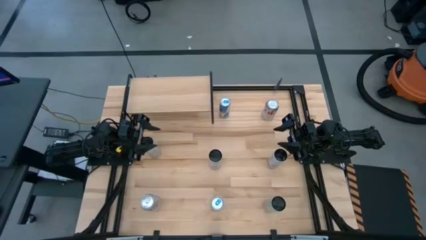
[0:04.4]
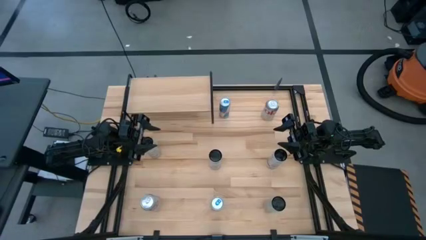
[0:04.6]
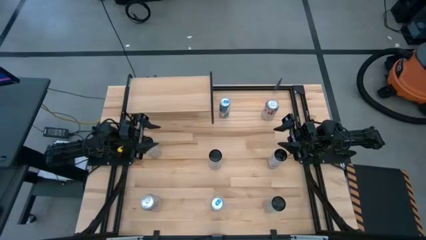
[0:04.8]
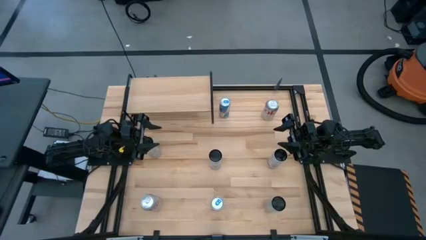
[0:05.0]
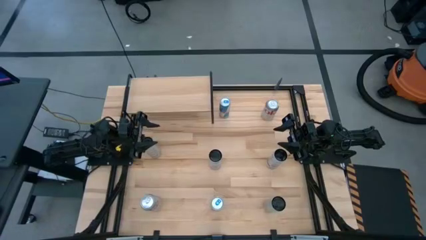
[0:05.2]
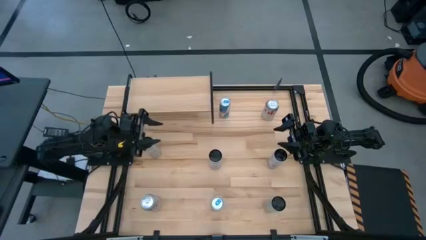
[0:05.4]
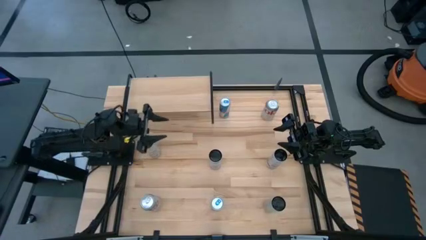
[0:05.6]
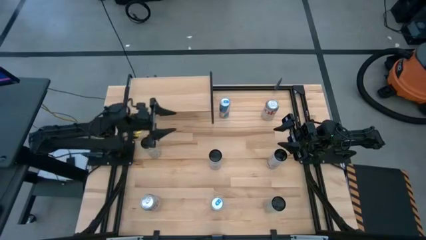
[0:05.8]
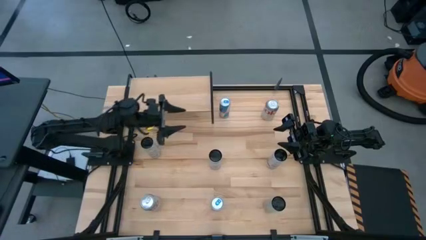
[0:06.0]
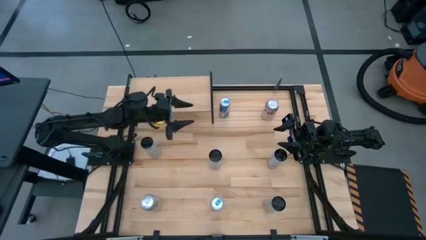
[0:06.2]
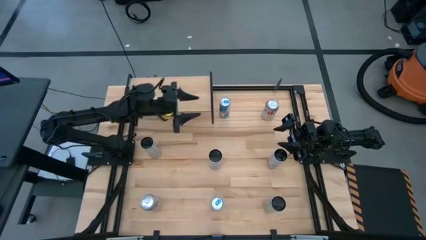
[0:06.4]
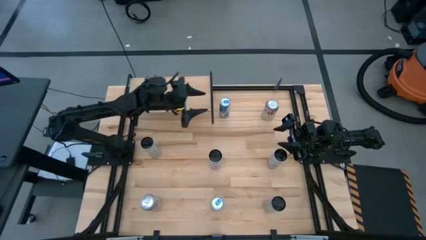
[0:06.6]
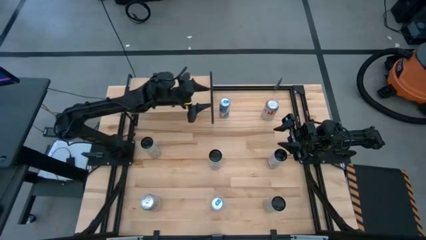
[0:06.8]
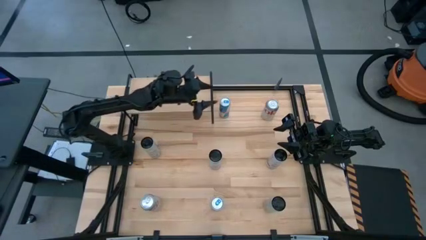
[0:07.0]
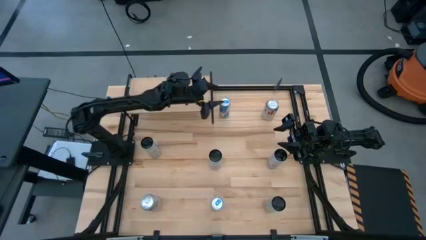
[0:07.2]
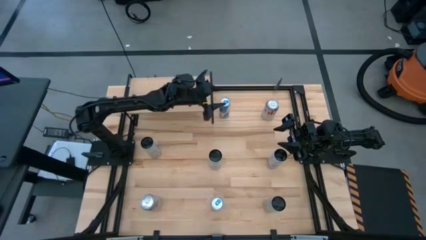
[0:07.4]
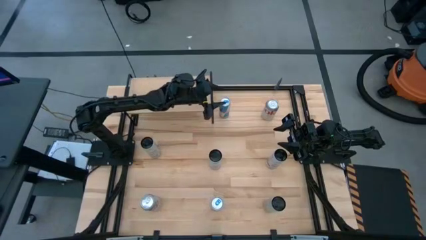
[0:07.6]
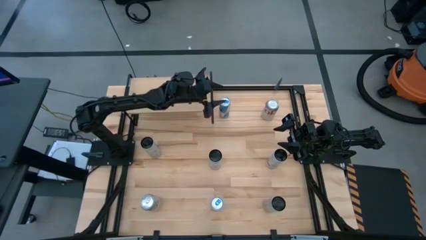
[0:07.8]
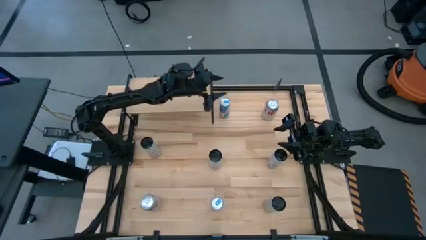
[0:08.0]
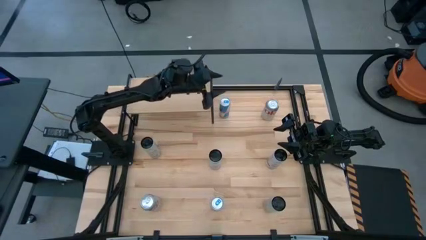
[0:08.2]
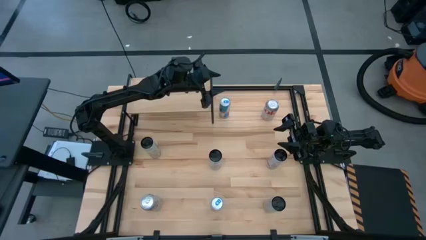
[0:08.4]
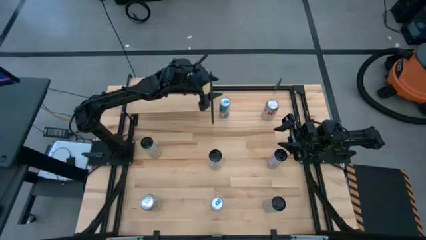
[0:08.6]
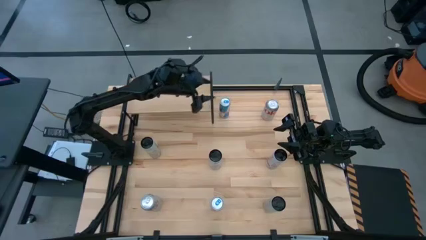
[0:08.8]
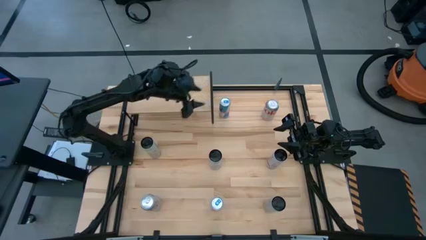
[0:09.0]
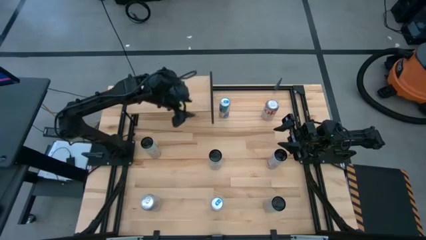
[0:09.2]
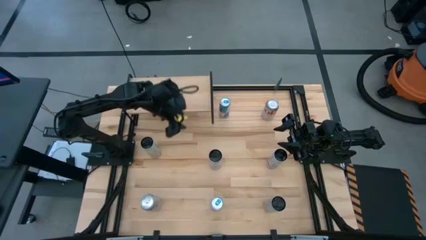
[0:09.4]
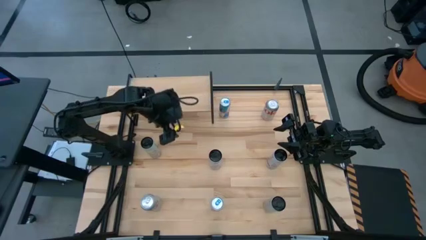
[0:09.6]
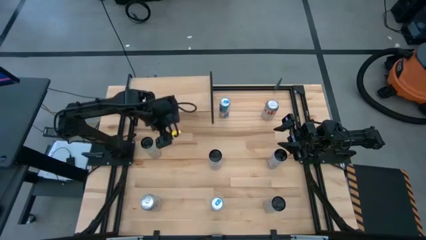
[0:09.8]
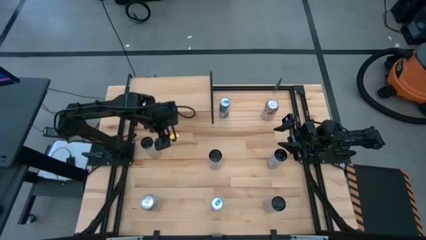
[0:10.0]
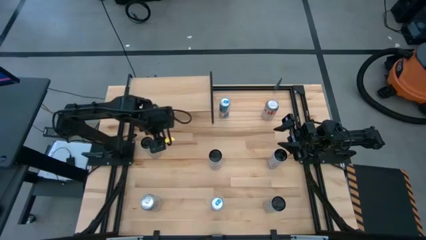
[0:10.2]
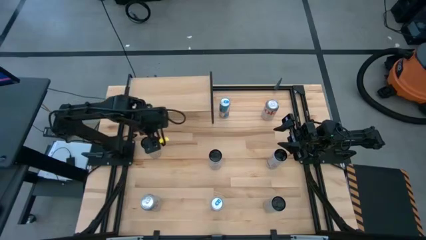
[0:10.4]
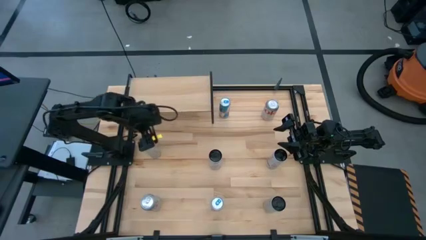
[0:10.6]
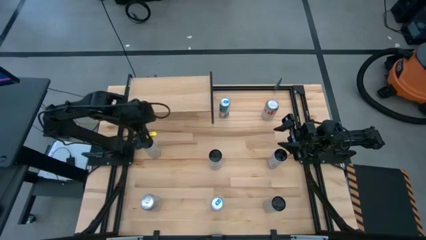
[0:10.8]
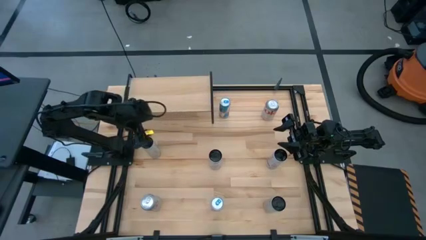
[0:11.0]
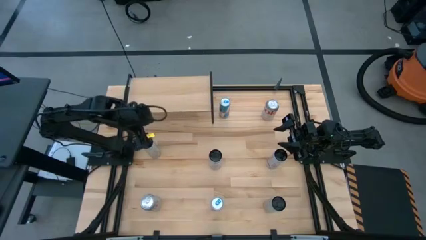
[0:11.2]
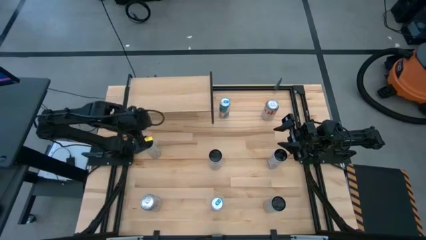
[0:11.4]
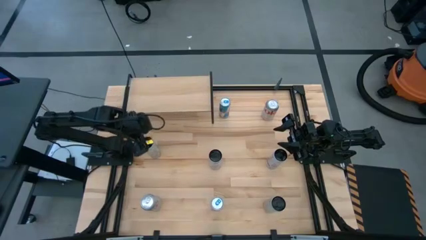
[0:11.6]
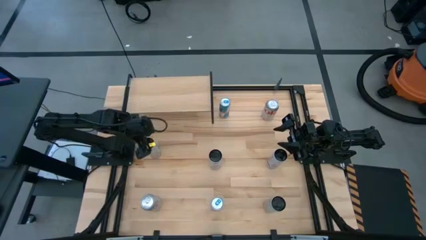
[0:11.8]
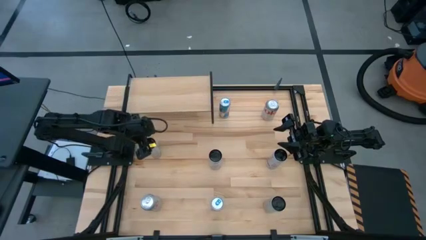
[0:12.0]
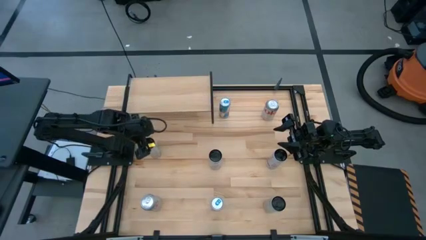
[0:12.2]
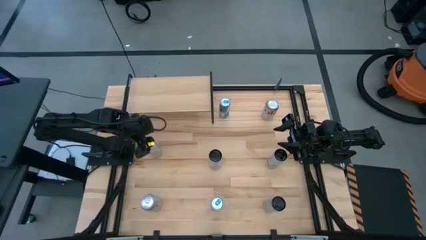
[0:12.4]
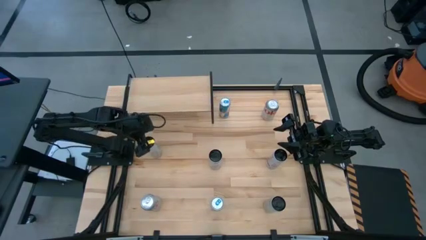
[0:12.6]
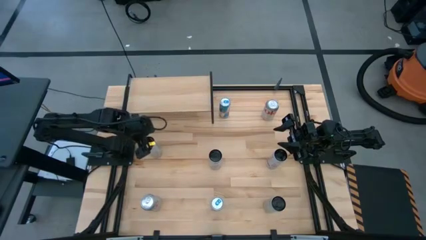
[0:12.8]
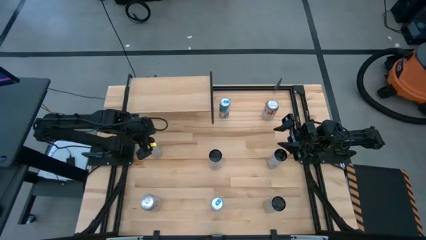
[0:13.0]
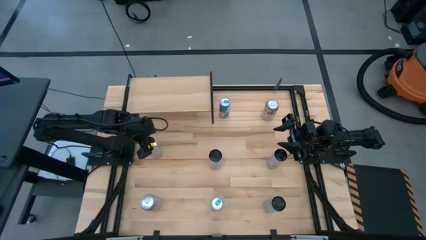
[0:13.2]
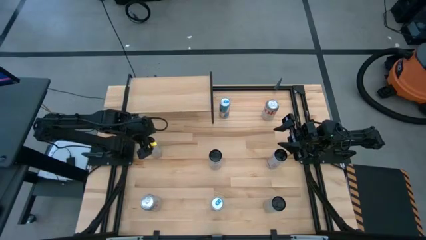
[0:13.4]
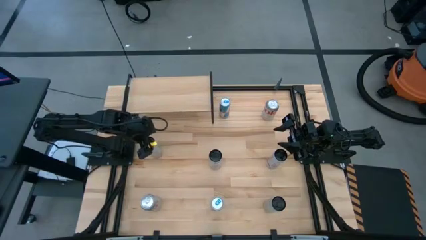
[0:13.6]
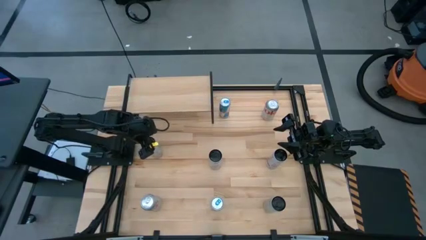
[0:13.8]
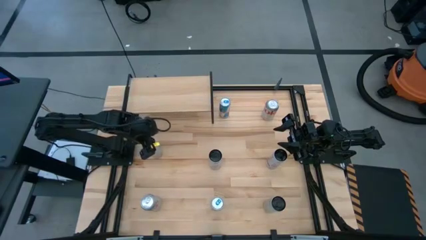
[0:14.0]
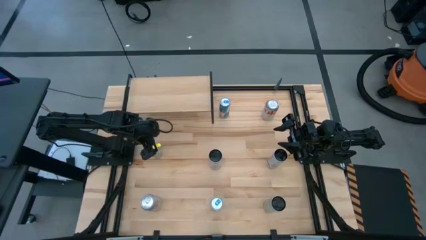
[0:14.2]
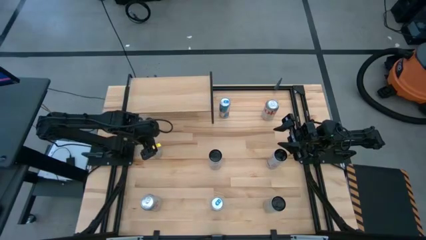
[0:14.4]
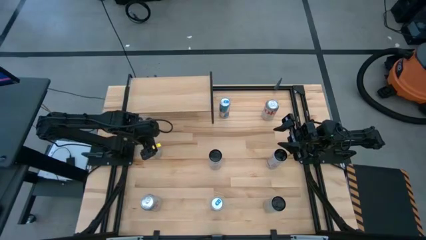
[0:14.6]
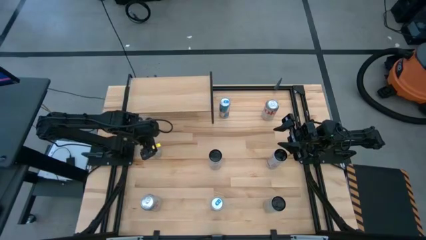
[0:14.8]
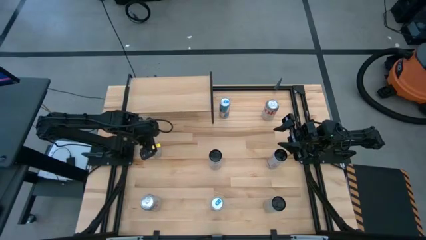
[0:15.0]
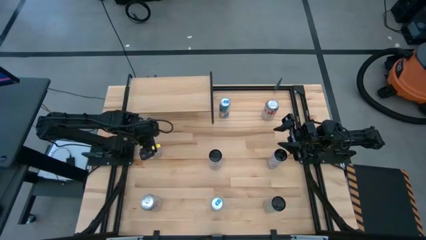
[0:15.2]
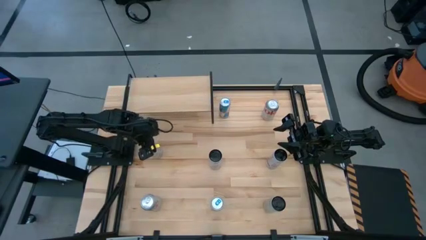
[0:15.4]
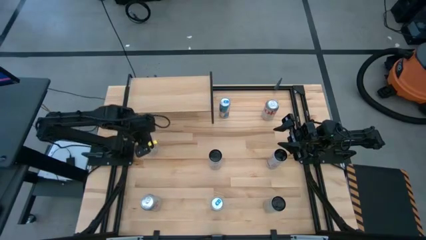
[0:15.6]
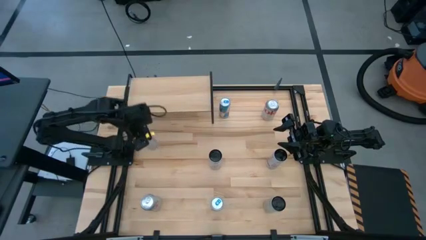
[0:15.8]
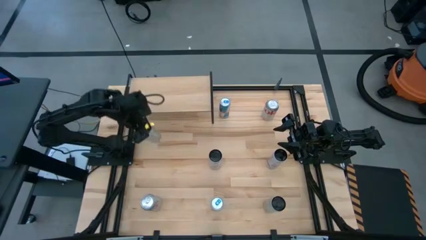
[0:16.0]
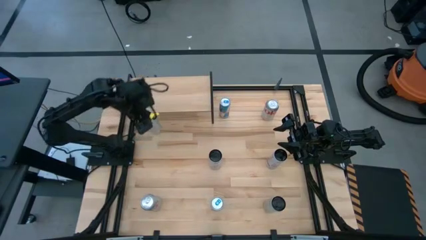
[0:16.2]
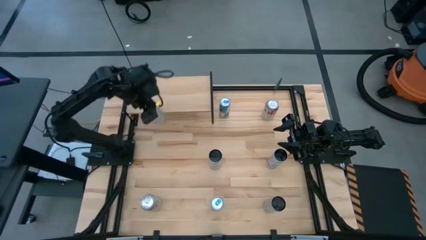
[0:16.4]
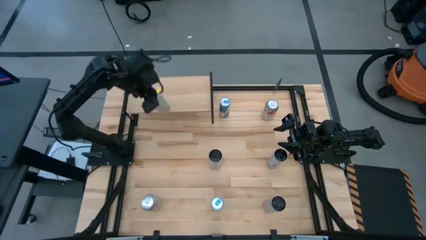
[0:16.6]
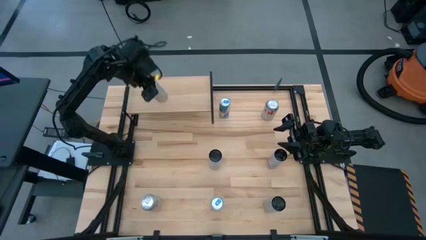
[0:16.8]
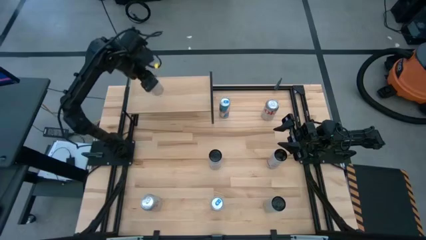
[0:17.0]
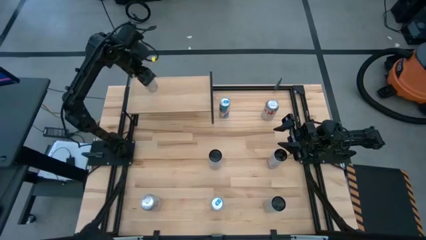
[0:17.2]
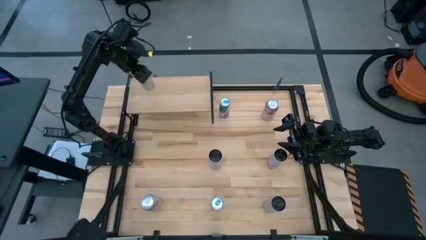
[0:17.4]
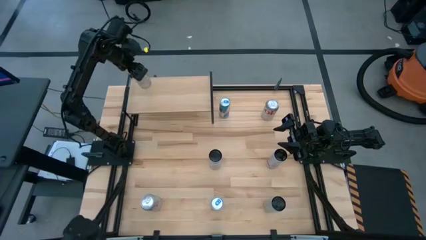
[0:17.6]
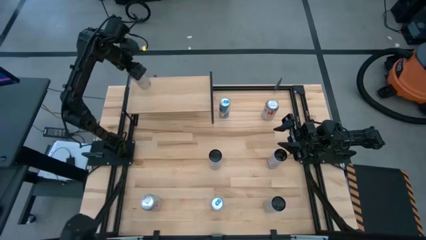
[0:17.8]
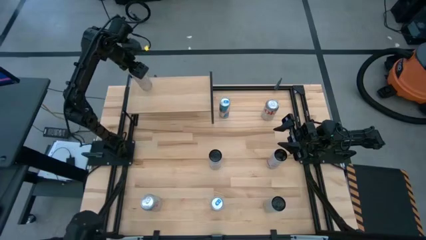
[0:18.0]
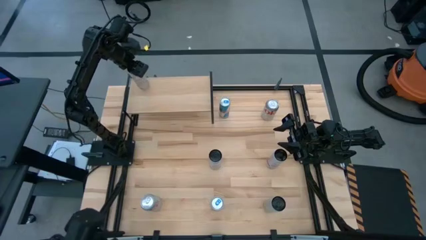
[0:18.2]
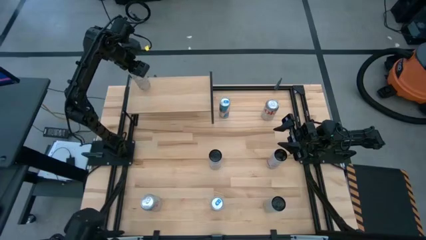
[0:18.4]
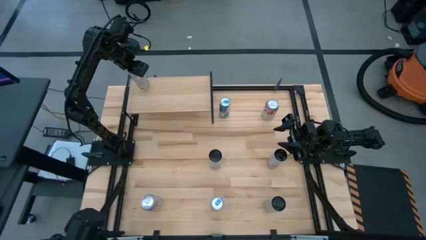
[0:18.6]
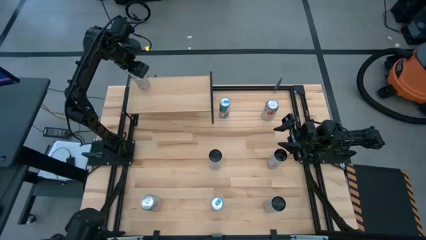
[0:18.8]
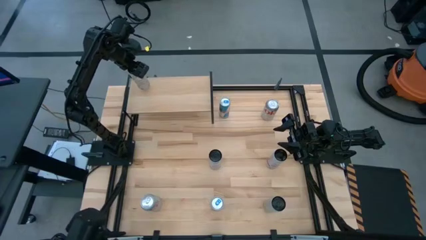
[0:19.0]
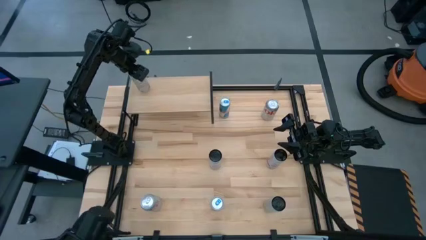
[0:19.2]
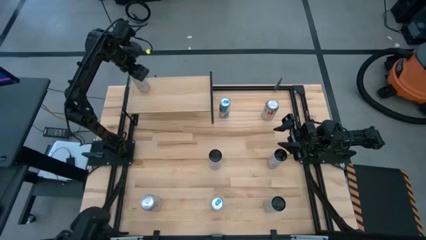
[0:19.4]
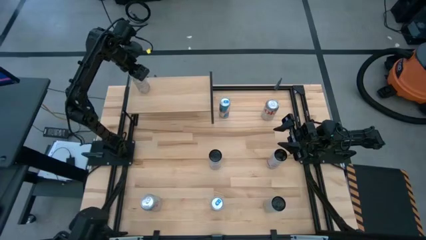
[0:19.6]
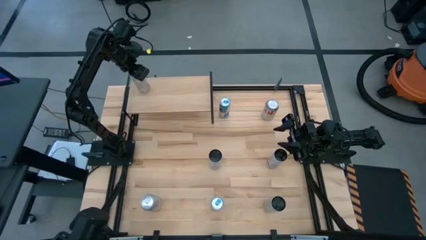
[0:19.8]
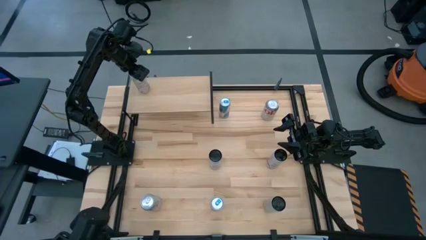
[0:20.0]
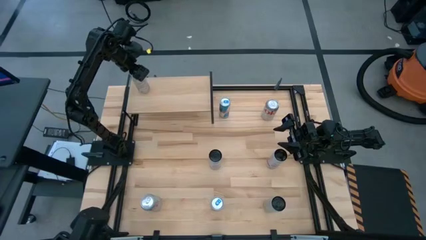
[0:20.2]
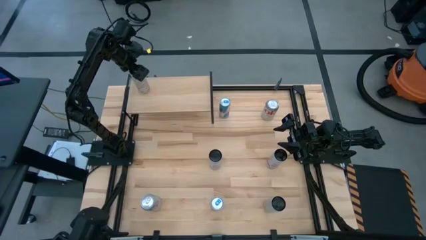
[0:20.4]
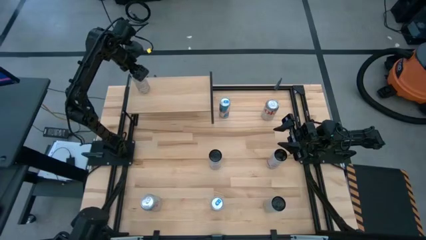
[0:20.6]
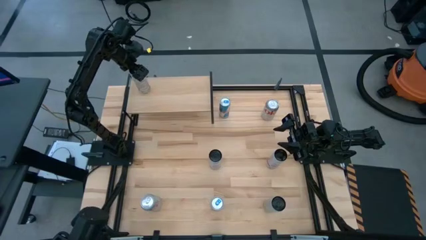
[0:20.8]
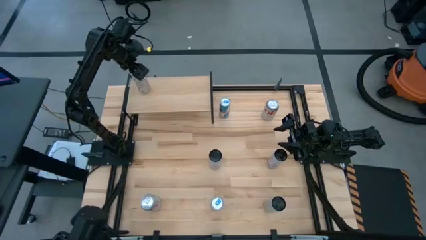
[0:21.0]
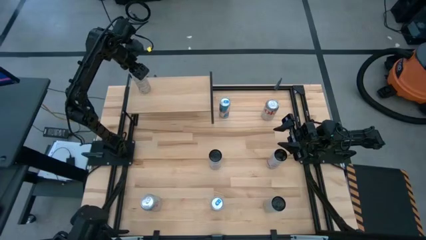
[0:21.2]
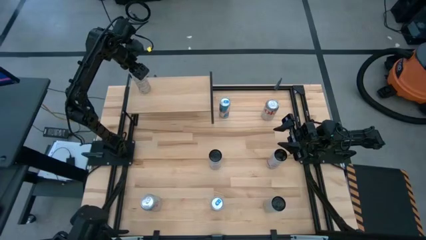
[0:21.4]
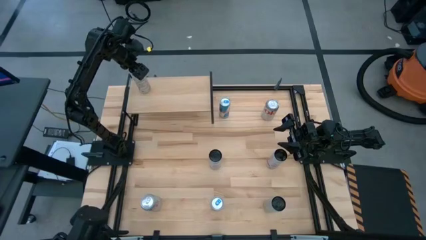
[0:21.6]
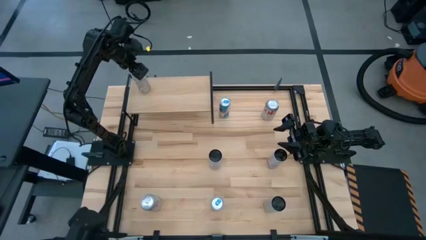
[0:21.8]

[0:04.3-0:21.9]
Task: Place canned beverage on shelf
Put the left white-yellow can on the shelf
